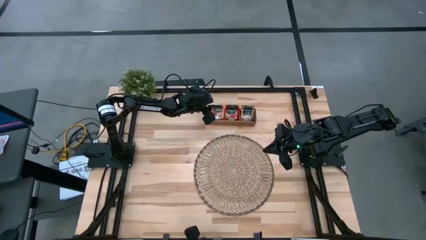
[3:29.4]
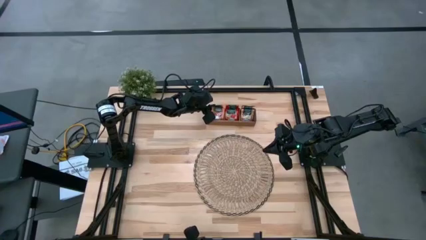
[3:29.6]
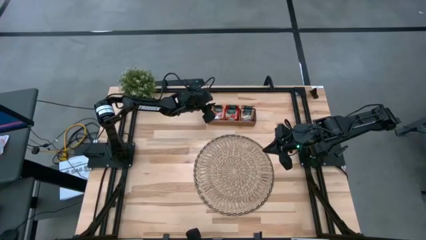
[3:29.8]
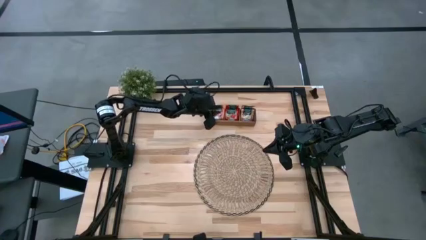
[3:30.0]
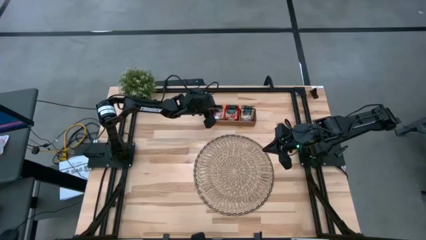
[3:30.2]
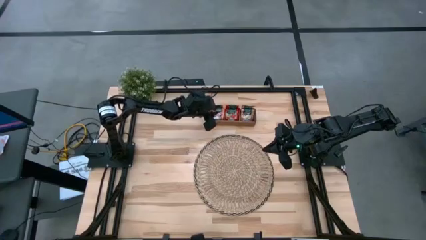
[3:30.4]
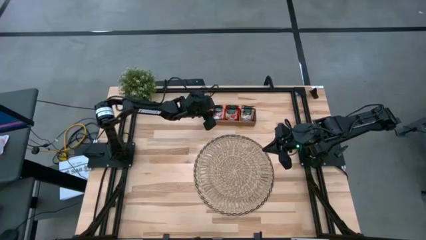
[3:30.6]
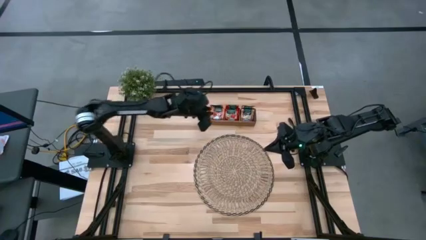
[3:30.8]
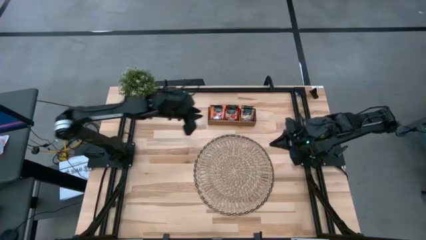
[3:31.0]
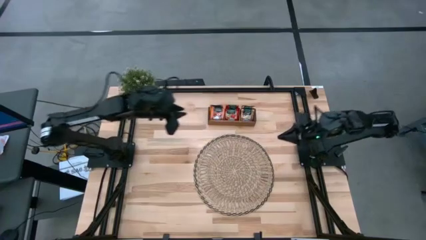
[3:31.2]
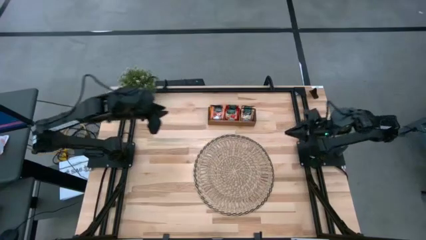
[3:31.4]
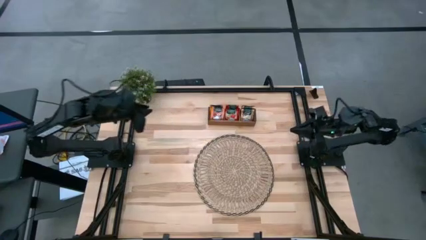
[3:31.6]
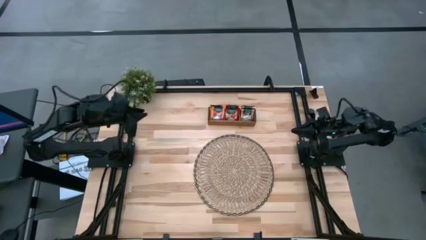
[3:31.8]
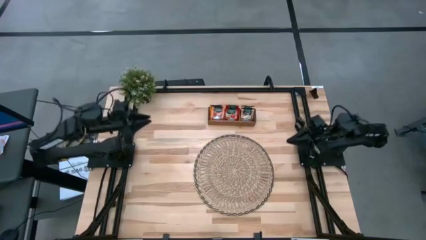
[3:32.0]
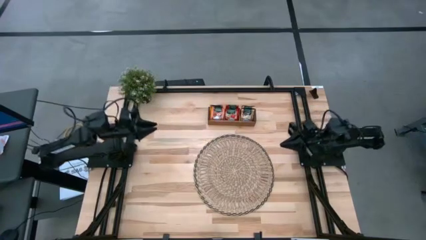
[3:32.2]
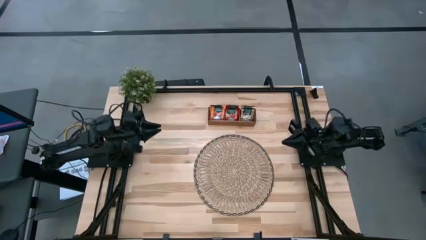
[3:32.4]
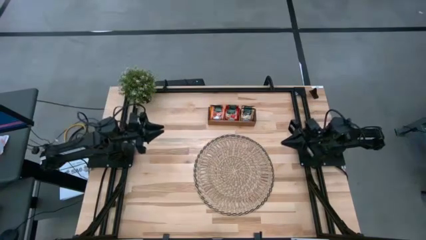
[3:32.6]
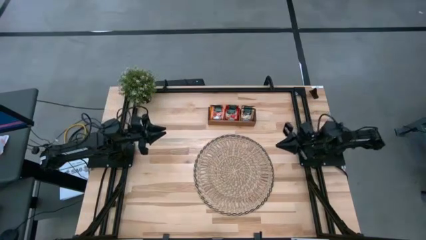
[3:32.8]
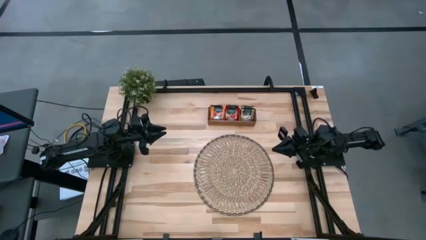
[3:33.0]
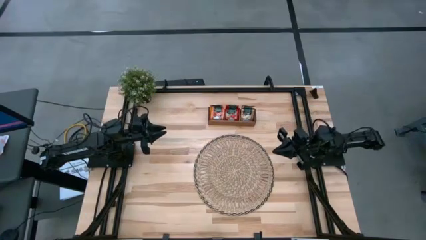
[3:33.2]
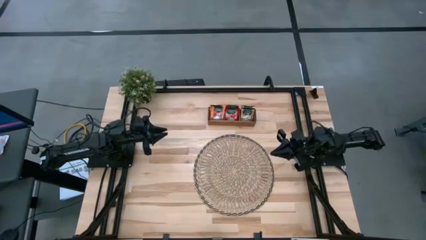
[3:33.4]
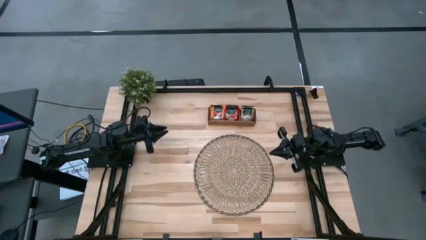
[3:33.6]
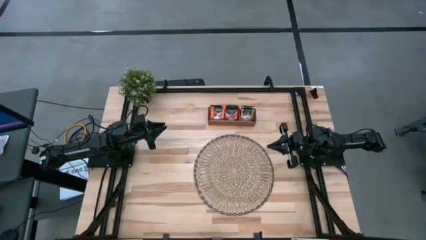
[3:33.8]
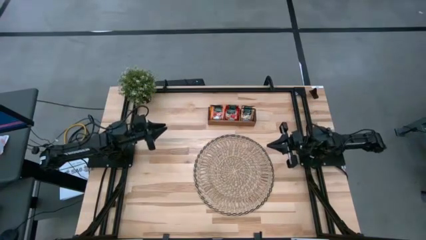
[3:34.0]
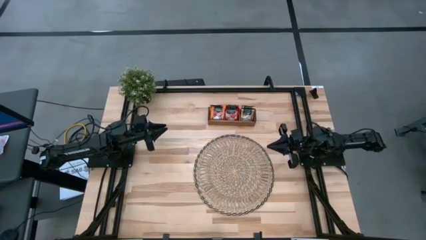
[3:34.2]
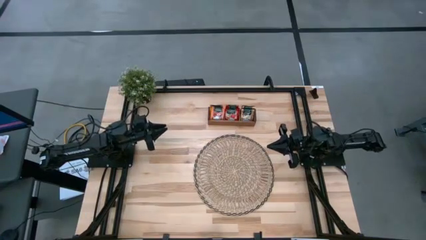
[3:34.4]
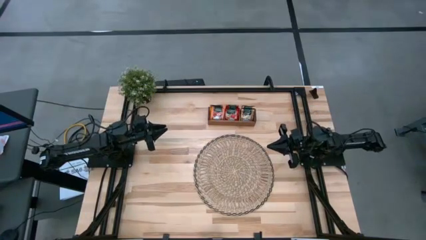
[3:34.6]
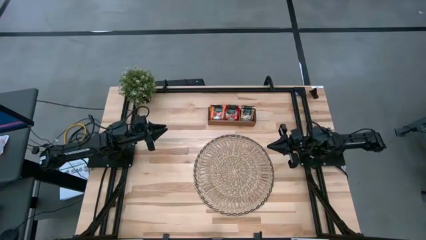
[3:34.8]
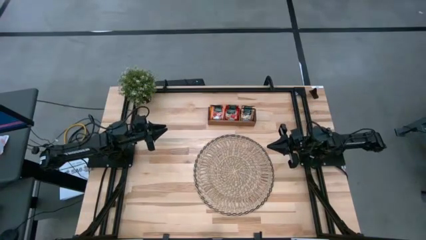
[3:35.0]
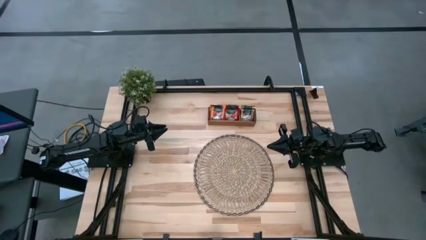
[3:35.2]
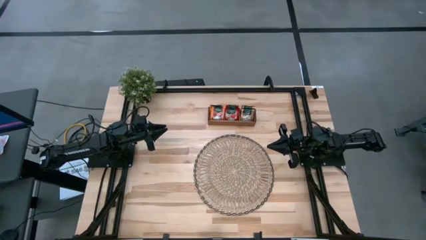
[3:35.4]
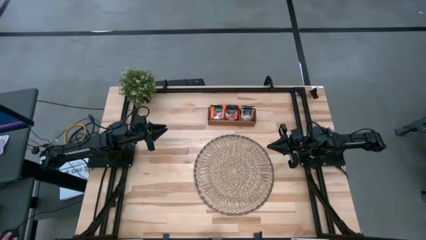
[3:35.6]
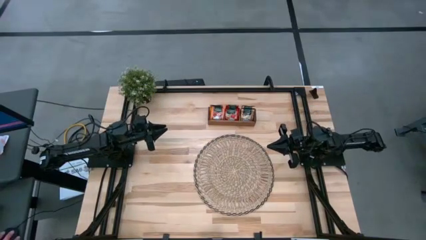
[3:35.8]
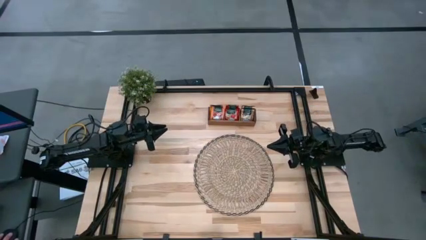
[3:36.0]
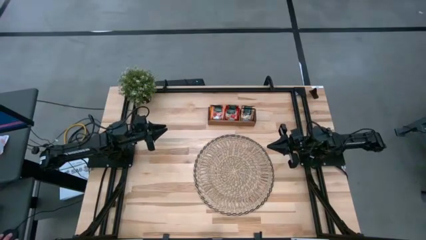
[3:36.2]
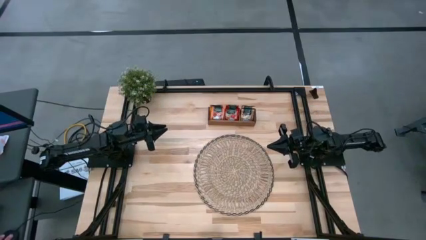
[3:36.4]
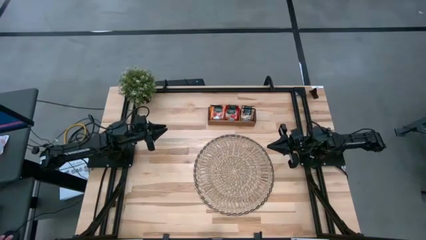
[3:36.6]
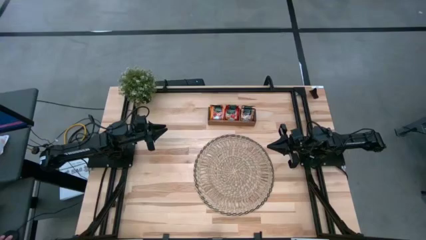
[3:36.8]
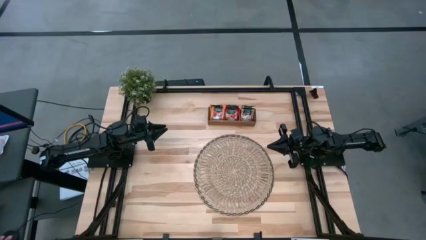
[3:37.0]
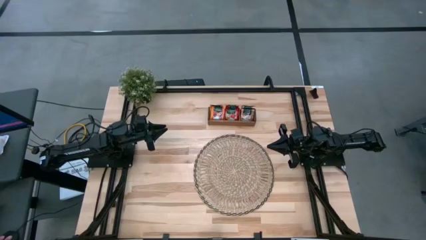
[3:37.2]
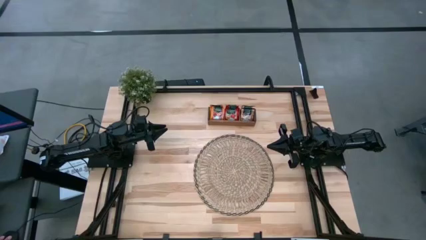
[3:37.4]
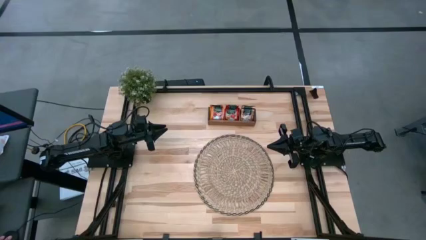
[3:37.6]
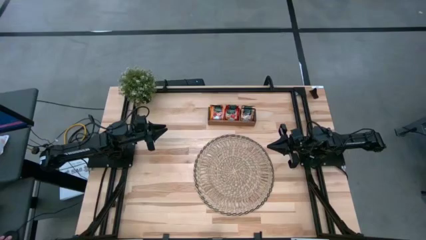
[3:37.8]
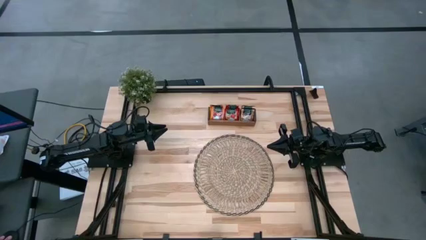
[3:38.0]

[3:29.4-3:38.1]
Task: Pick & Place Tea
Return to Home Position

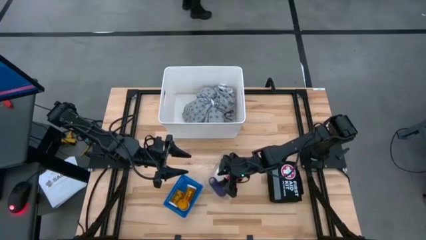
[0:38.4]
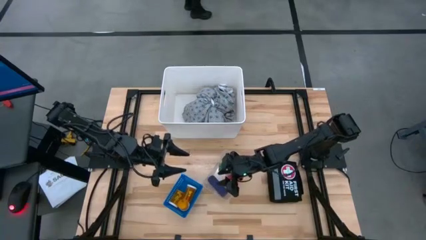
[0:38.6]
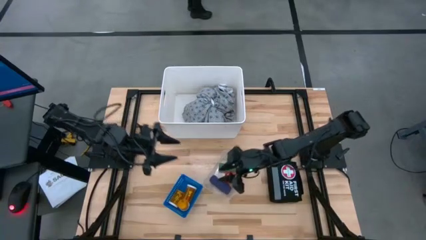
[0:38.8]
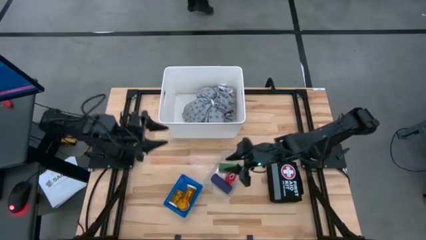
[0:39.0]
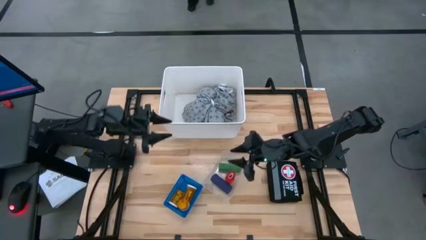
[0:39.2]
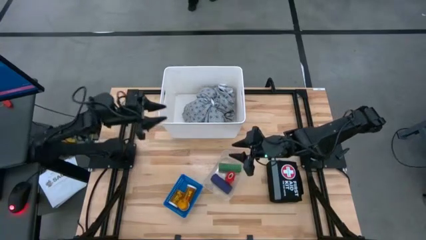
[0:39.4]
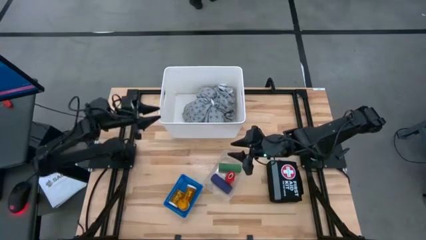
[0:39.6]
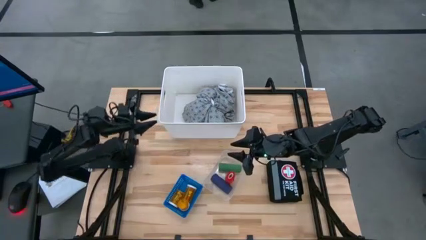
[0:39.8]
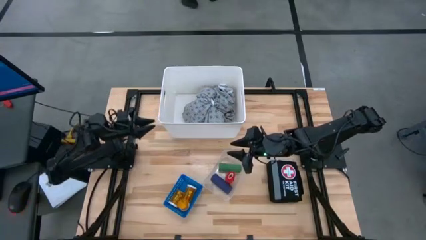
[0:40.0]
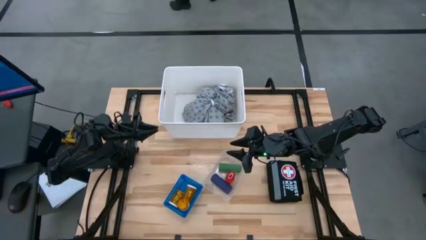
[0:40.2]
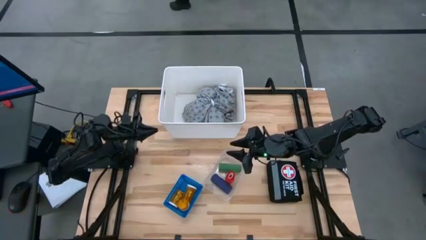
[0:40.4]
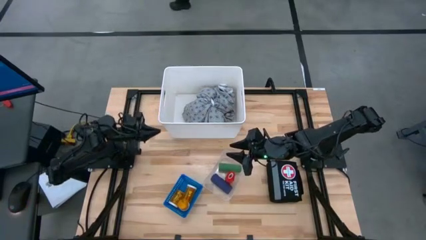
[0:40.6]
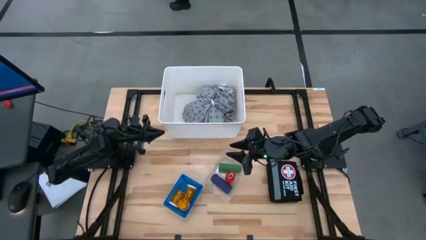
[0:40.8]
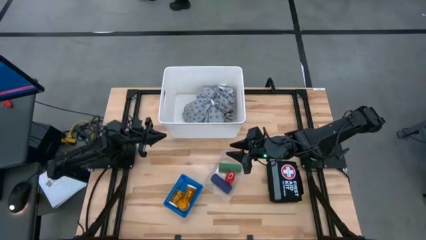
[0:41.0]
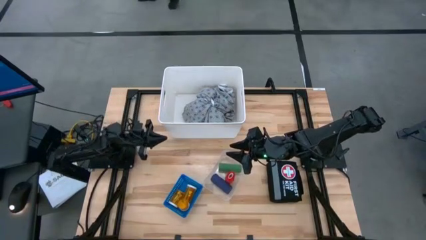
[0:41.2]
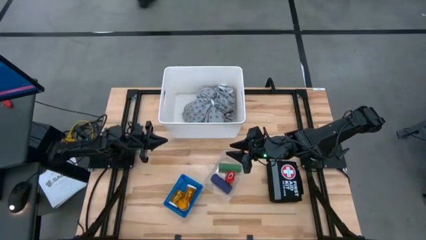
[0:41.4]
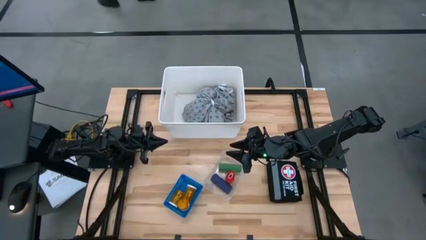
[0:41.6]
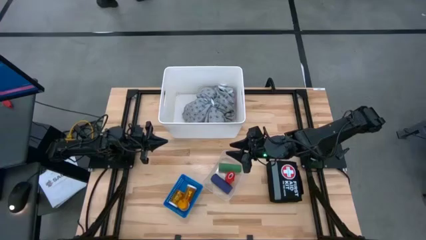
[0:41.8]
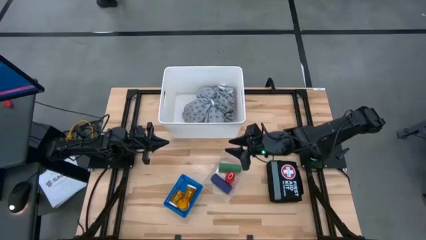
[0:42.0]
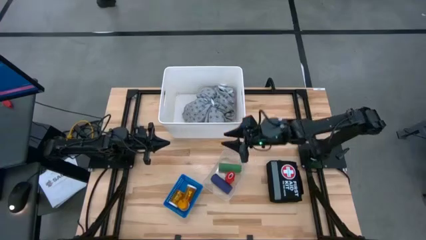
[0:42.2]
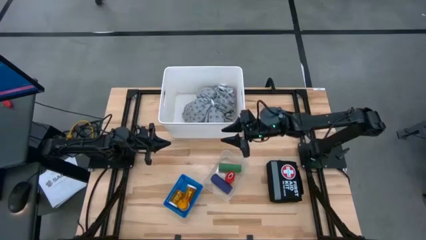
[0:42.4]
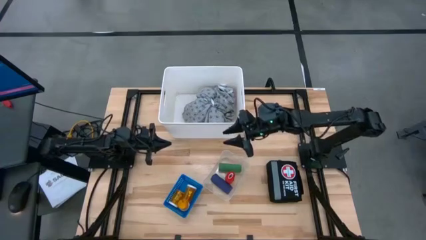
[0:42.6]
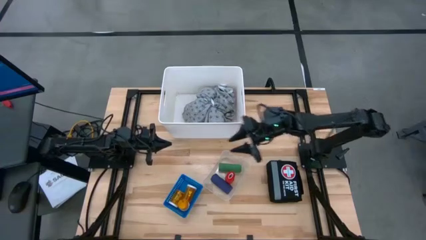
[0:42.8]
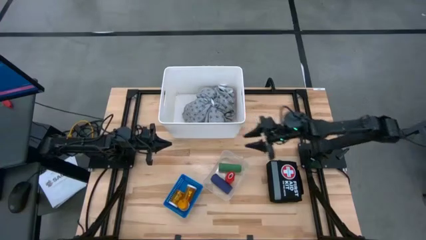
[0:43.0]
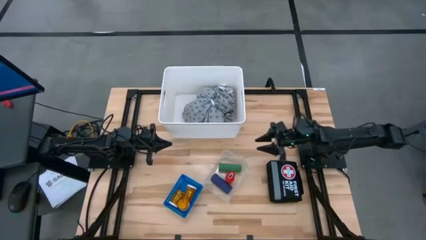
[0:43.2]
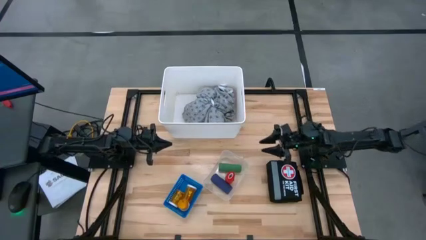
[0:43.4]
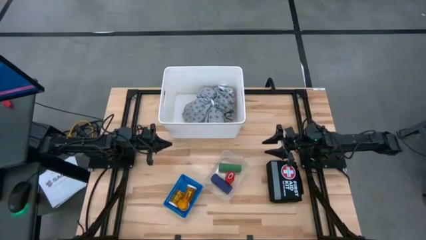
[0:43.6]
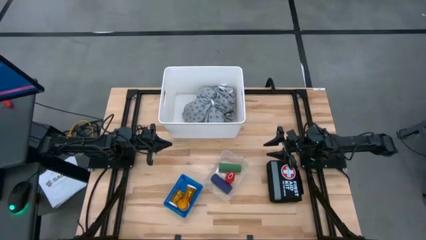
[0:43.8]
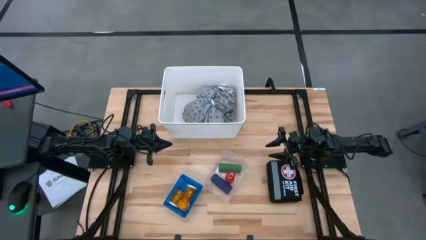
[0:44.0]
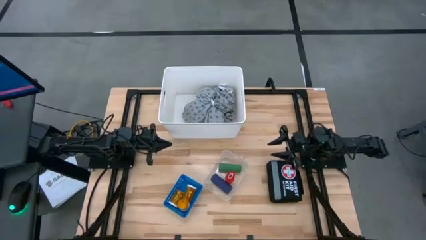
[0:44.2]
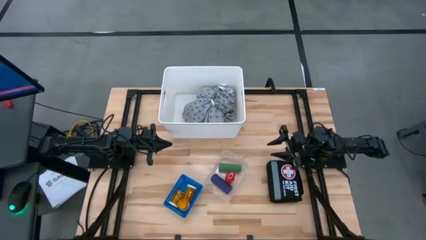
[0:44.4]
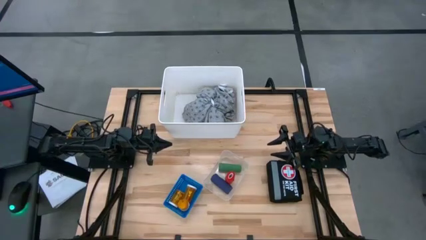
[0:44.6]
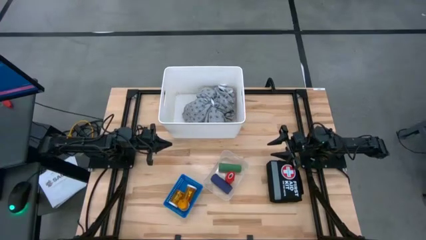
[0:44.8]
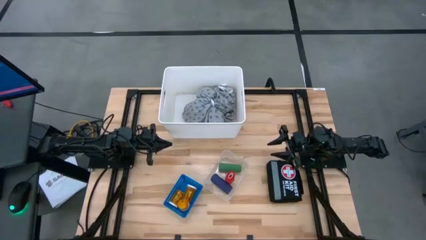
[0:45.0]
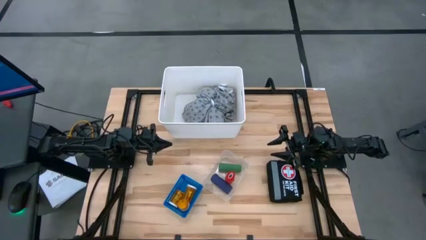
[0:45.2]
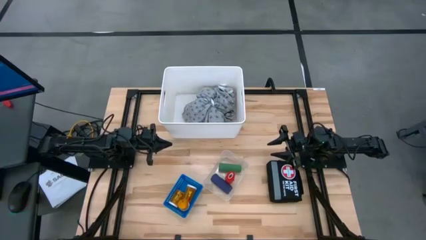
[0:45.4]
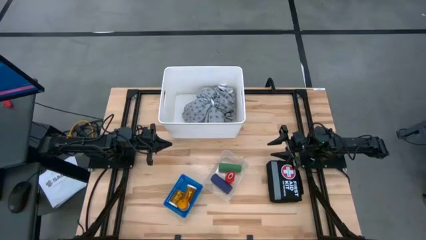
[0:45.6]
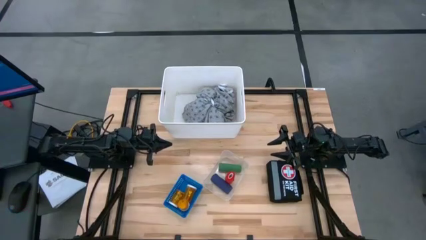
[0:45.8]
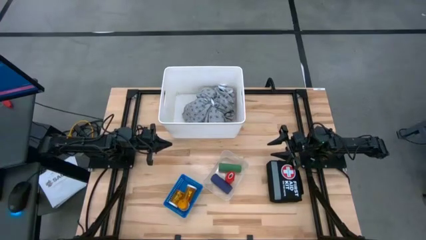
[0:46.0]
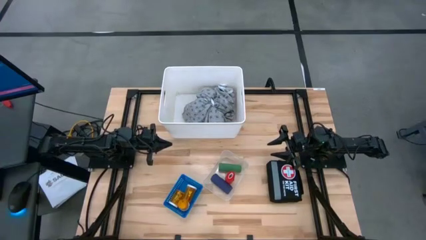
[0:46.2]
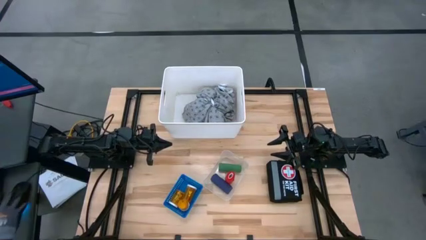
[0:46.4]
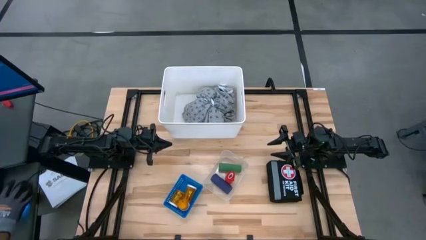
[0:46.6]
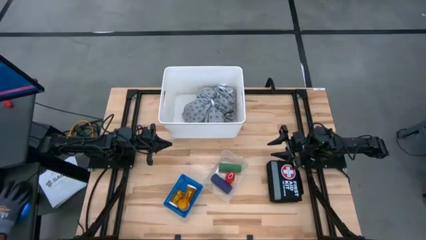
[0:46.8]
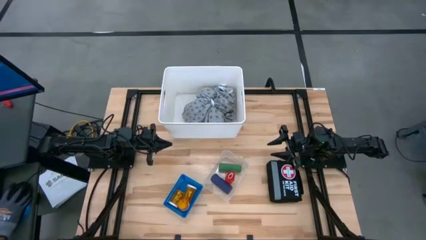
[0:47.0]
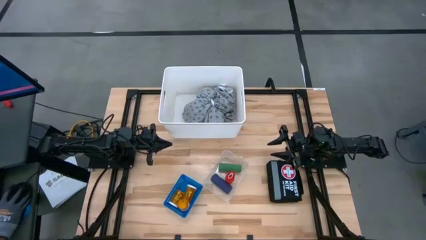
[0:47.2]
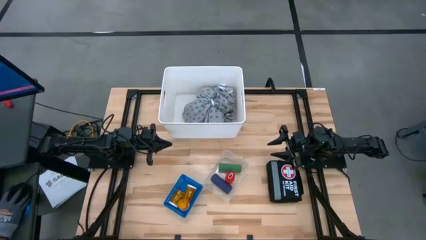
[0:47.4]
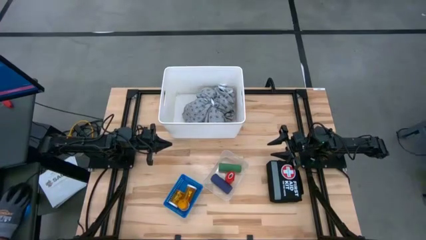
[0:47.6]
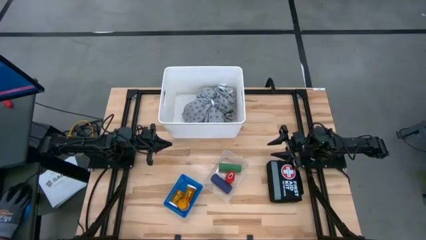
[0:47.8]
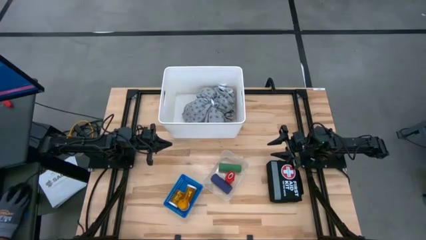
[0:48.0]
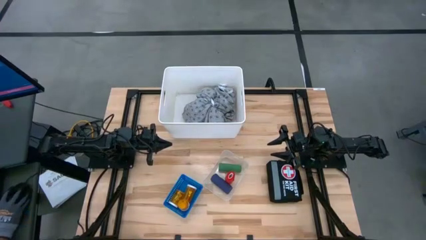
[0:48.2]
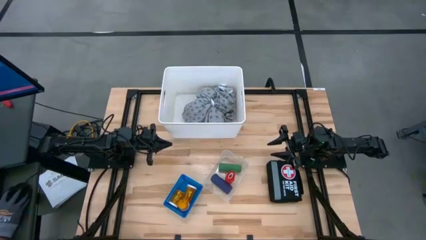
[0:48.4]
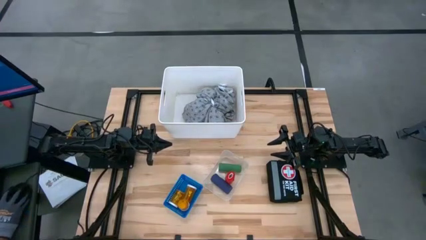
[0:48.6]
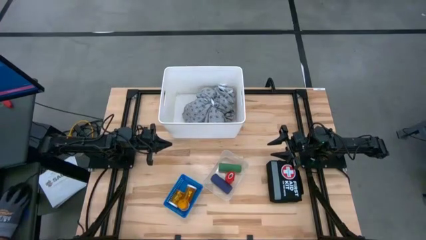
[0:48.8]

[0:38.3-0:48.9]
Task: Pick & Place Medicine items
Return to Home Position
